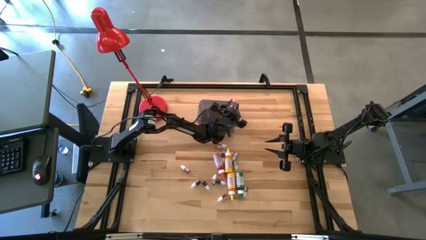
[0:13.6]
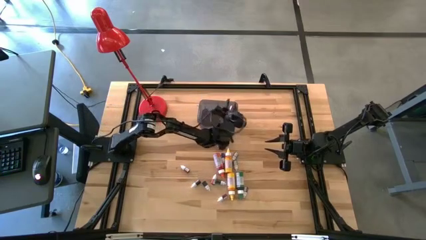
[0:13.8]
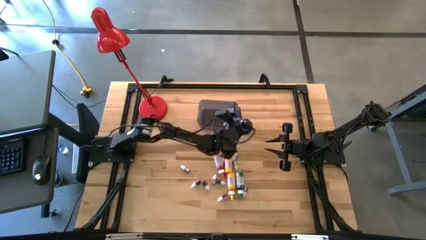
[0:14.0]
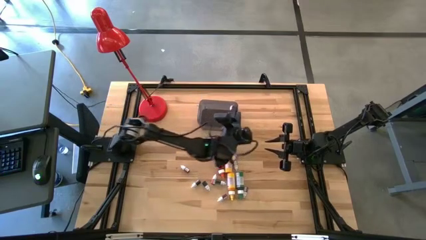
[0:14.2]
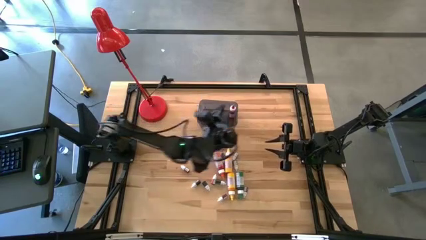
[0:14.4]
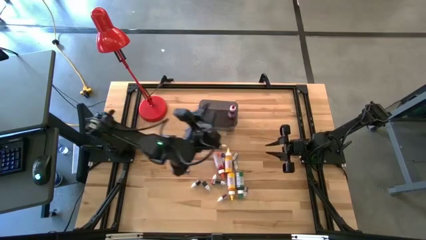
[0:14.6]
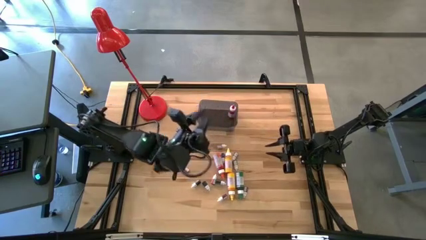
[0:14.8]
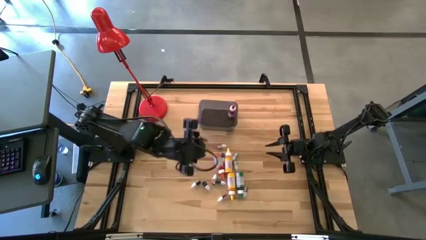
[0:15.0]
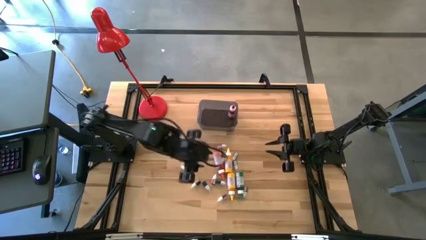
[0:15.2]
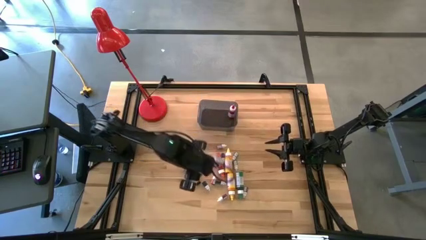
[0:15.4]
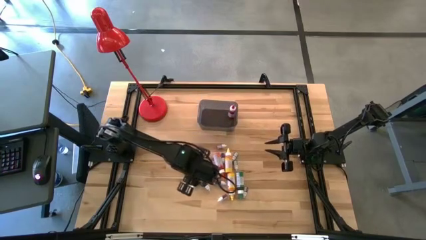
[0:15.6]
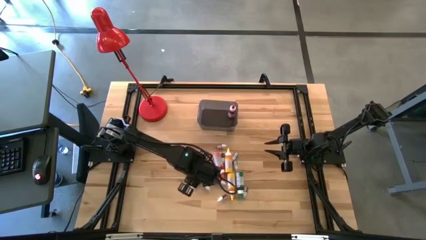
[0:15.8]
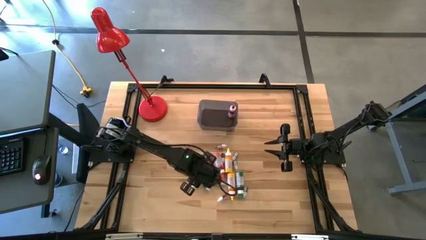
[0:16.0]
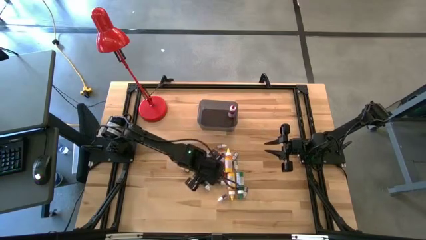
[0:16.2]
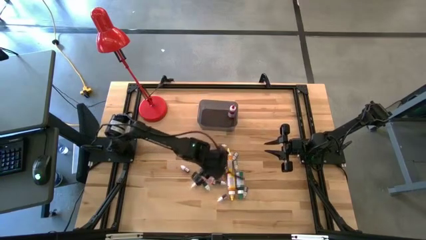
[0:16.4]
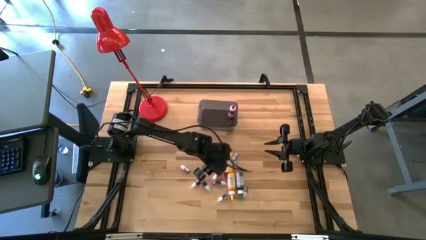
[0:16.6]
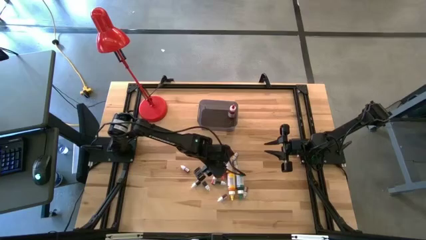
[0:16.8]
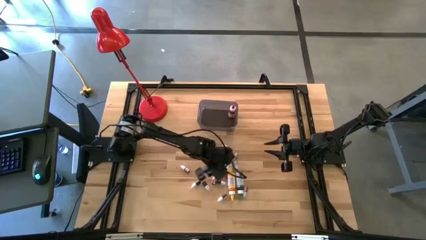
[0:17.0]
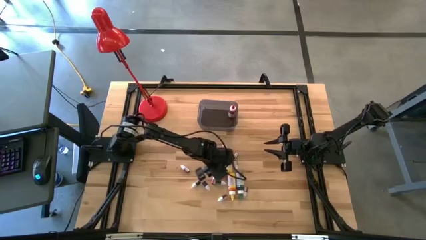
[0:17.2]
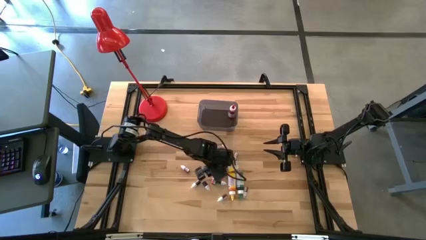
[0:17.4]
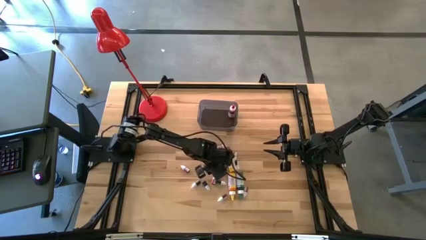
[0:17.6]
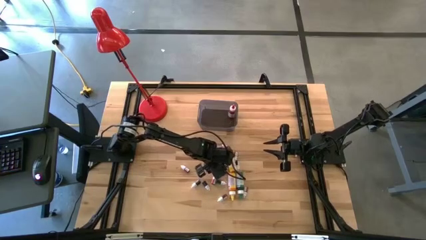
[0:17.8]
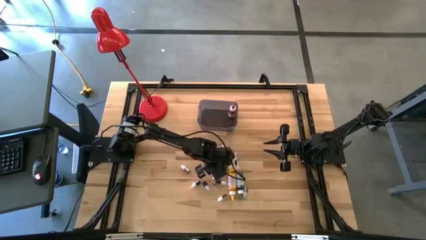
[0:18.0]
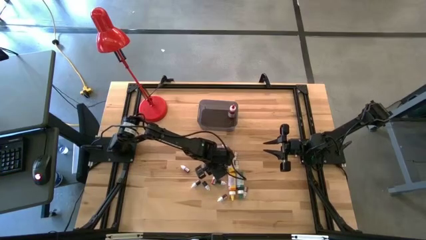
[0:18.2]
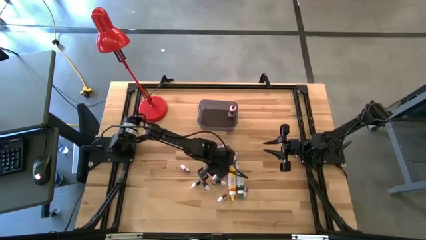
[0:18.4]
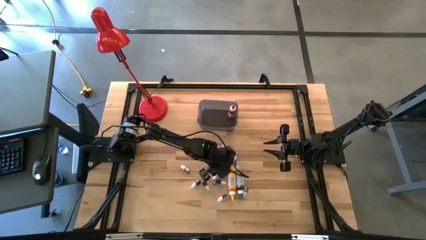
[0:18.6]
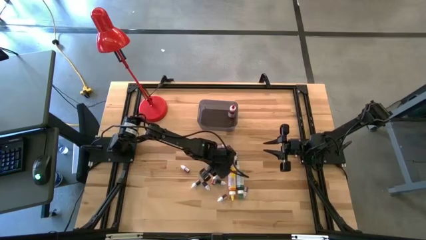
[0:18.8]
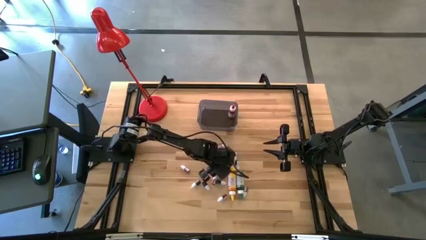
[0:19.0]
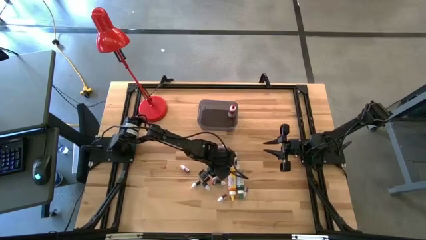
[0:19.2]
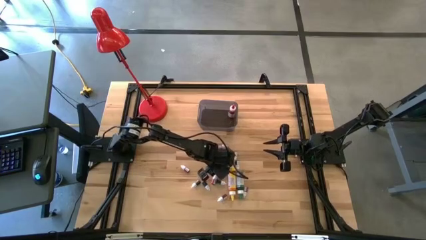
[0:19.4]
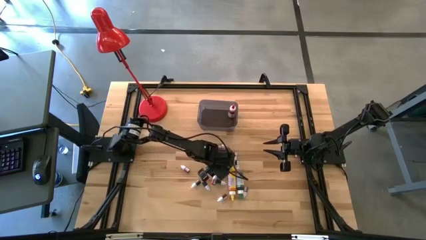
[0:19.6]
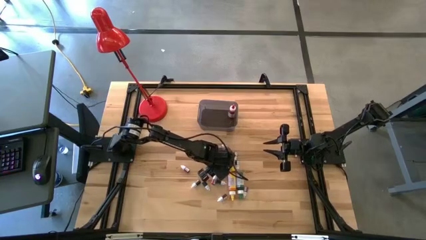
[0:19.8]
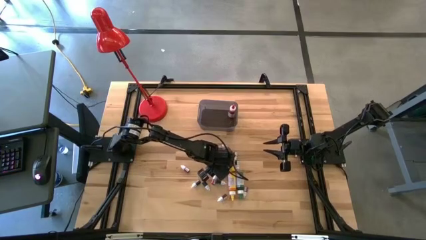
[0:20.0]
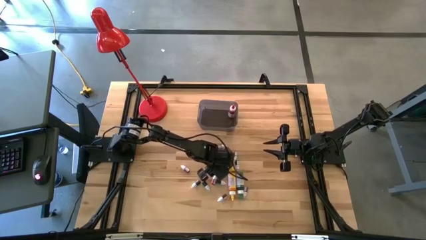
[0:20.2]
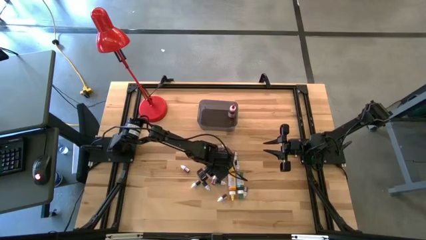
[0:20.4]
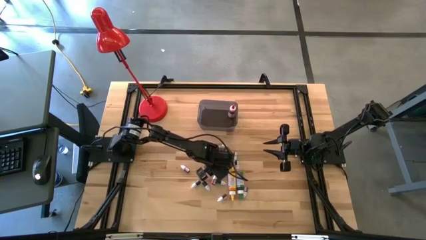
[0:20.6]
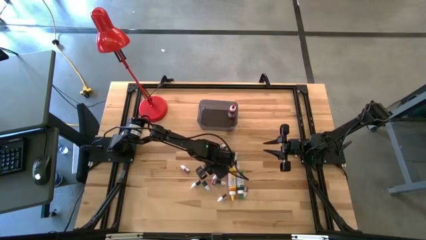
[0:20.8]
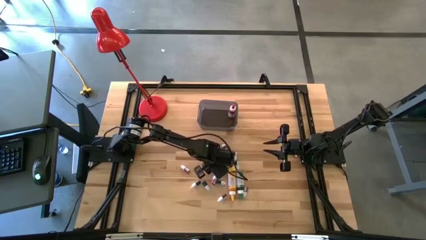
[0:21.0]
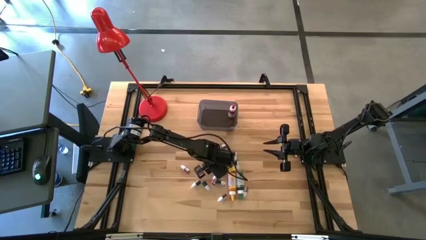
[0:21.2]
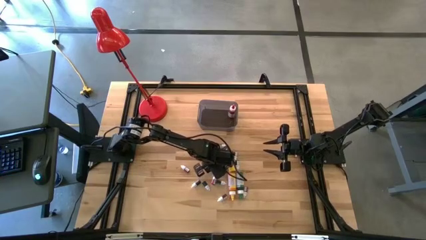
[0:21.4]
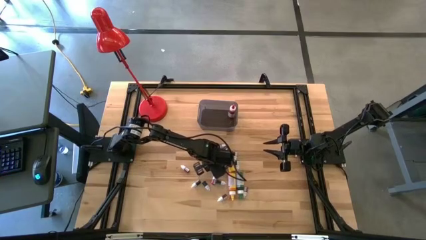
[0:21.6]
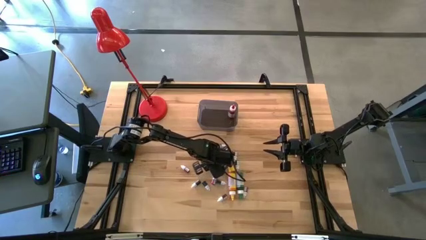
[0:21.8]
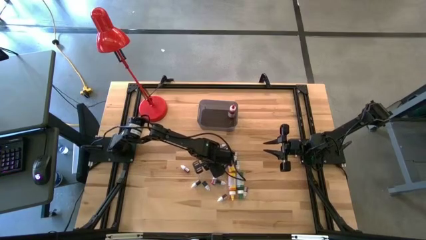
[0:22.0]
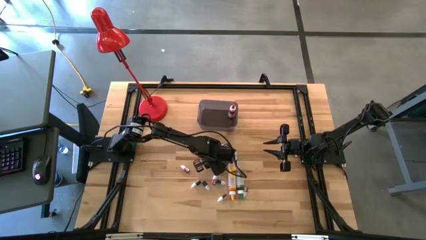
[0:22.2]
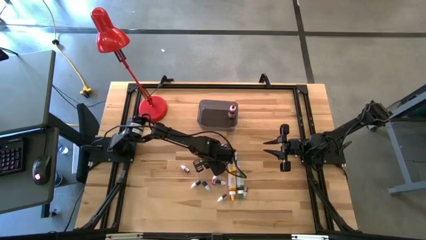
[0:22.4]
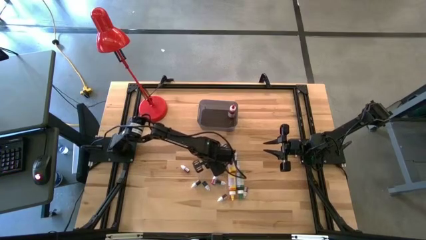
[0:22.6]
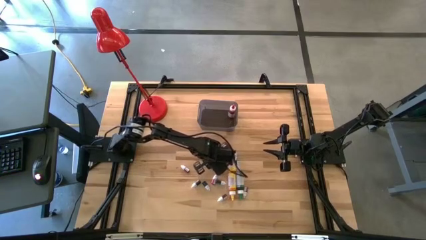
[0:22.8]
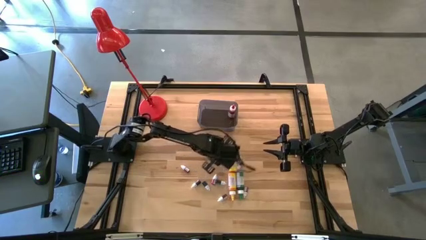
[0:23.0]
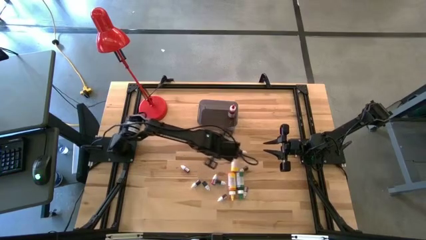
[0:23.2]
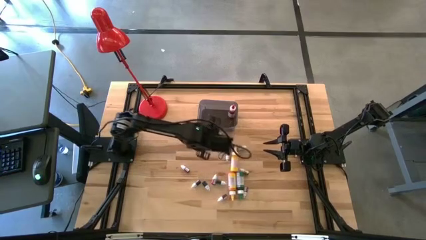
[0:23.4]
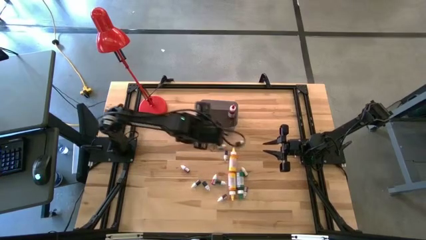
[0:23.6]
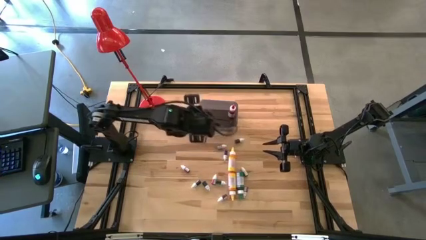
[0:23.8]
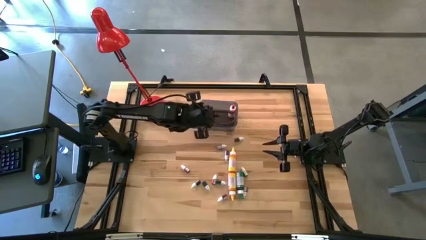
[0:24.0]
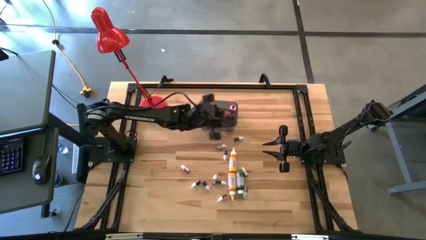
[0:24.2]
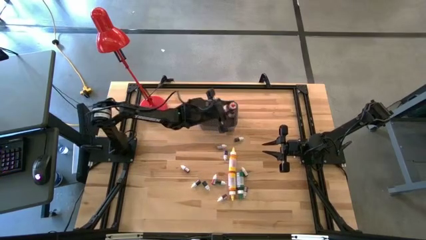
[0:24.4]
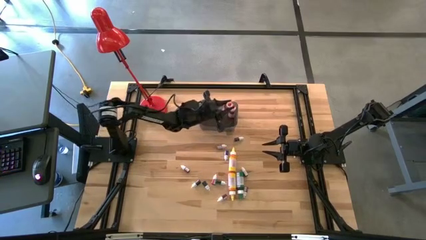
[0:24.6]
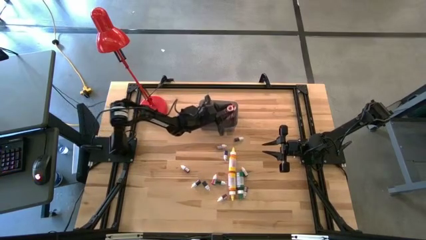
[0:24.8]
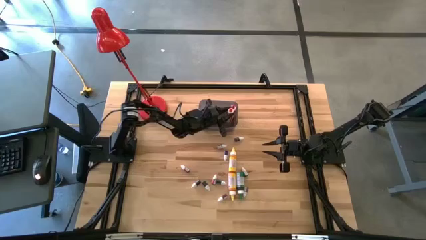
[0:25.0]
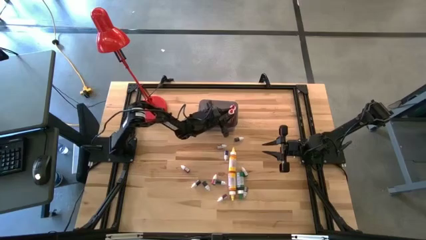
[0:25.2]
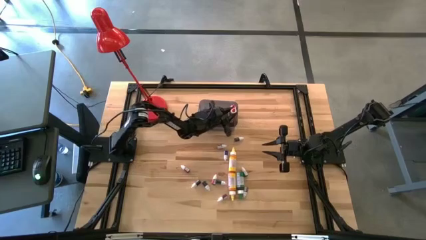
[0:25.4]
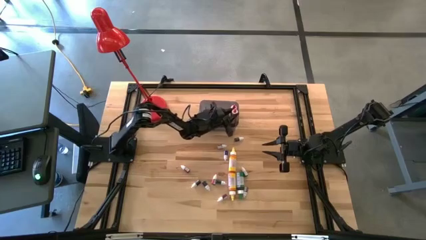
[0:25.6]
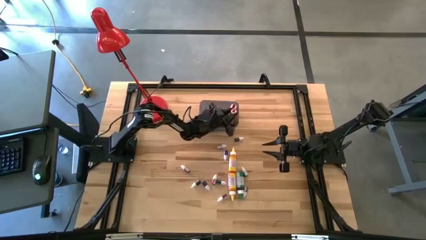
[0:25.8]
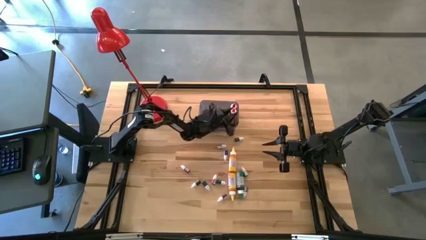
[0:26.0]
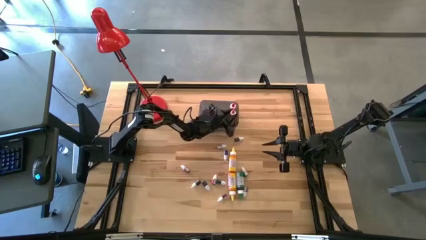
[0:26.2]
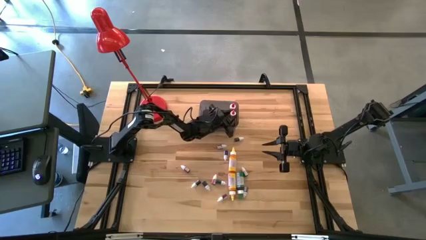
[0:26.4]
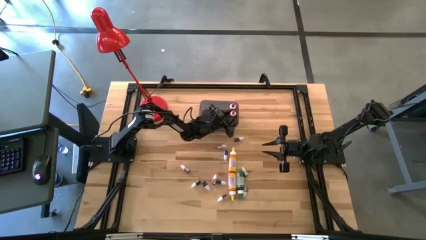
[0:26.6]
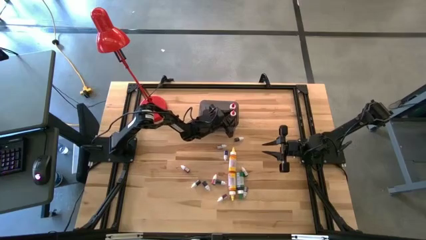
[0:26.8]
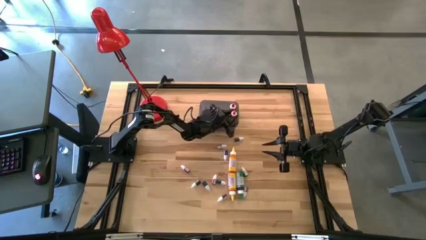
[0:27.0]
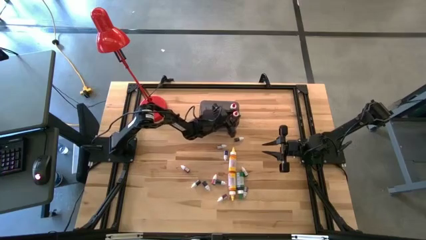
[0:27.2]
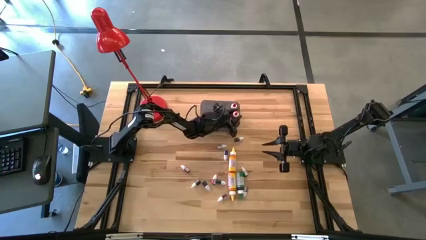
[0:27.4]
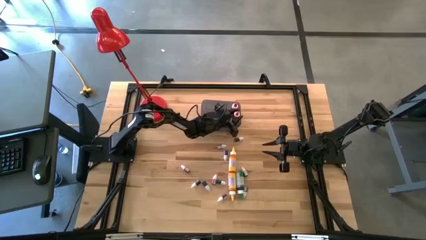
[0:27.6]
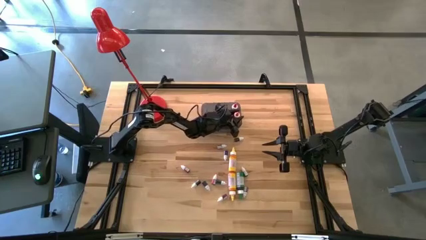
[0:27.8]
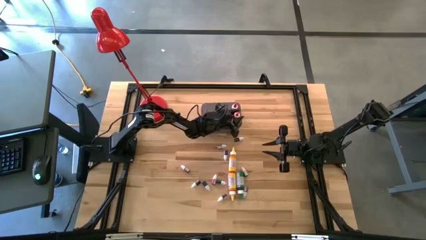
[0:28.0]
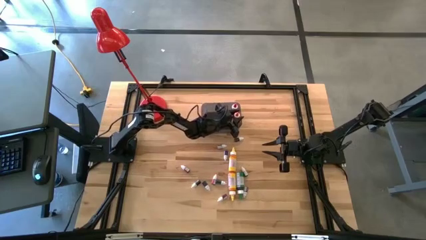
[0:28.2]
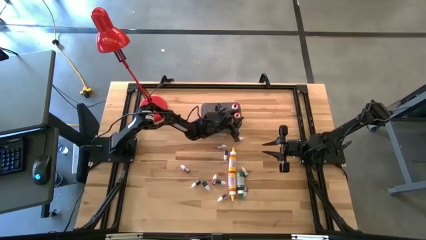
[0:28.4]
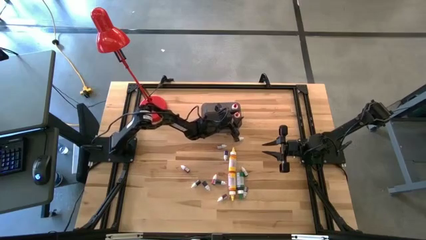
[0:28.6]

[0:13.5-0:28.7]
Task: Pick & Place food coloring
Put the large orange food coloring bottle into the black bin

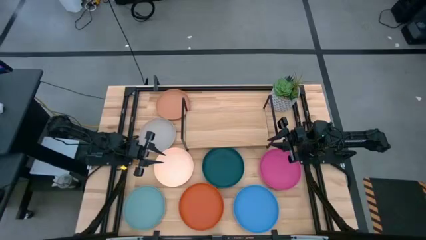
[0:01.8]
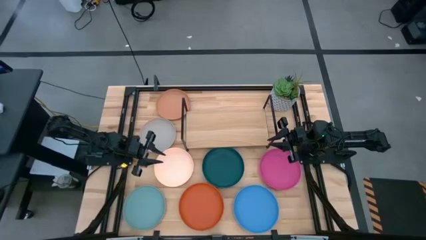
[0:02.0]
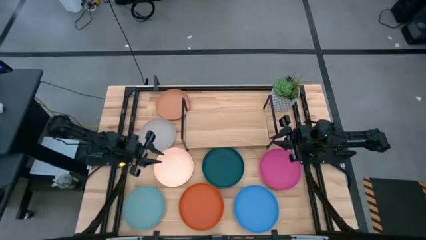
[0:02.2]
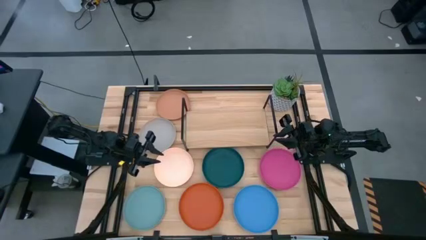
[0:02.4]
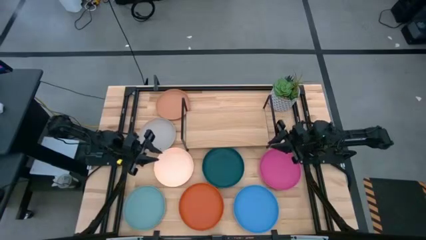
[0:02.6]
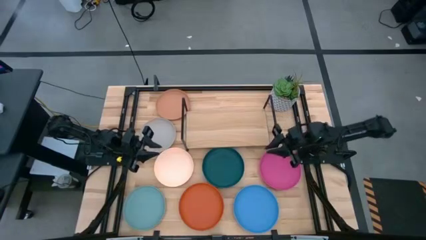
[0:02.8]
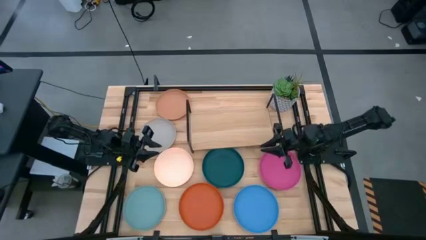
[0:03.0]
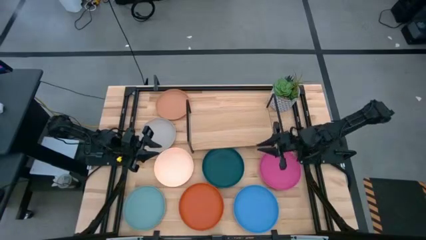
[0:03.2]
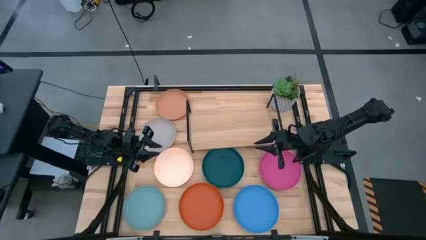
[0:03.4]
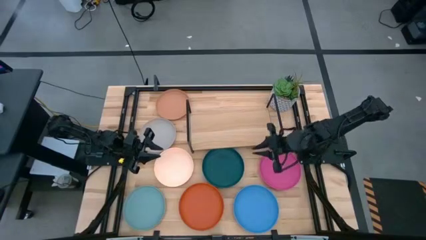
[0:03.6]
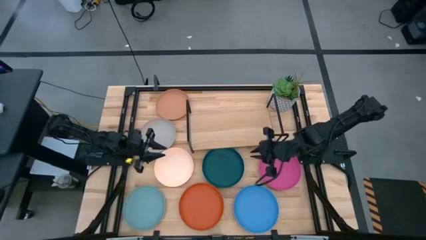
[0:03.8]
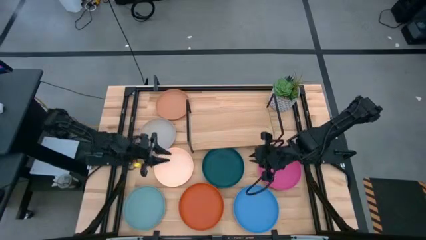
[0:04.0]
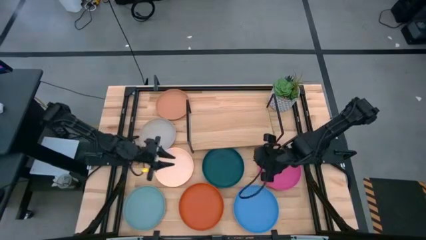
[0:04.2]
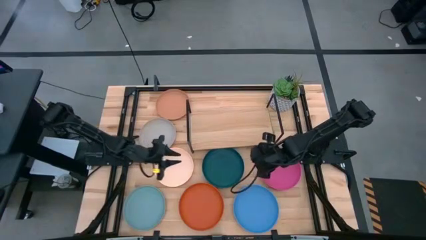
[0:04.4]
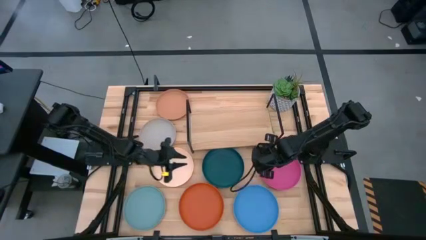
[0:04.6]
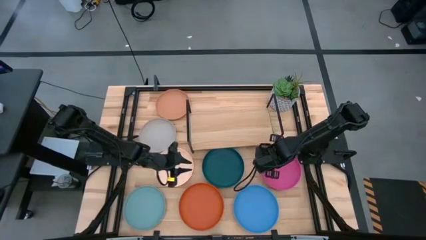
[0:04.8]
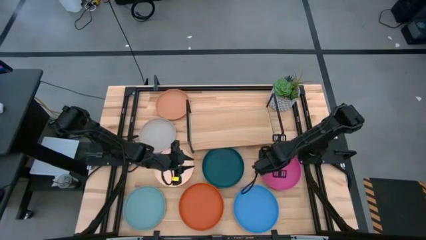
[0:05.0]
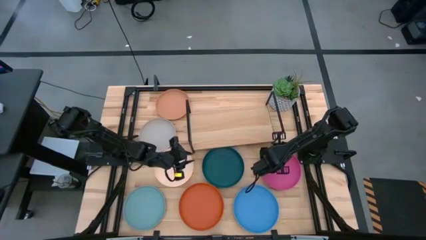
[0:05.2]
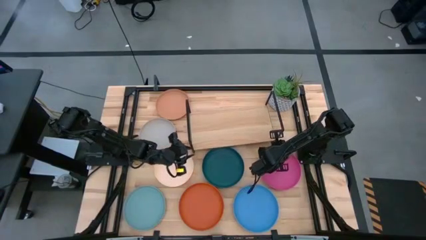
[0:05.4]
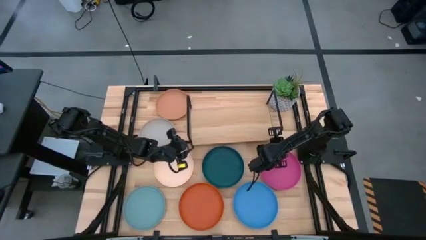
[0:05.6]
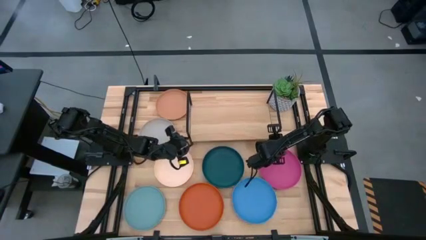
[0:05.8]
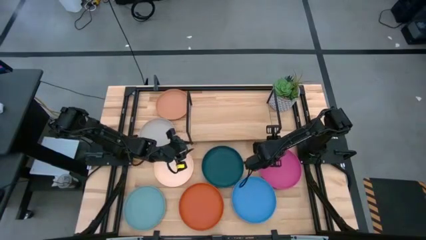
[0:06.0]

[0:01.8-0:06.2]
Task: Place and stack plates onto a shelf
Adjust the shelf
